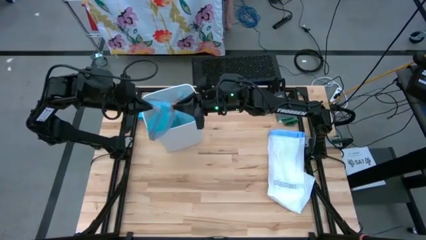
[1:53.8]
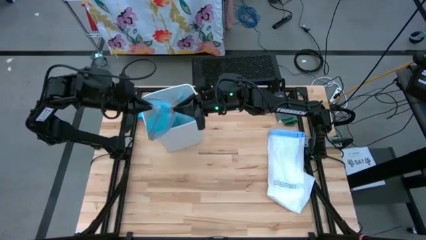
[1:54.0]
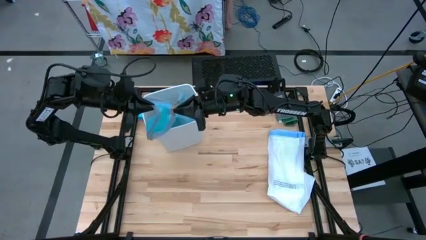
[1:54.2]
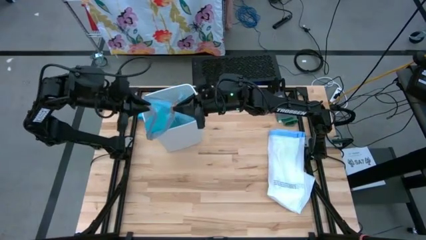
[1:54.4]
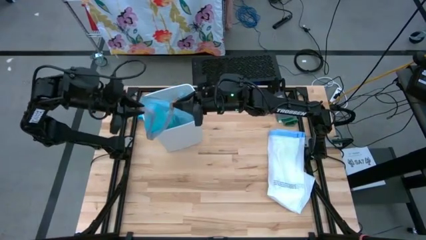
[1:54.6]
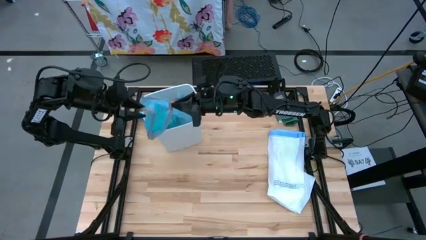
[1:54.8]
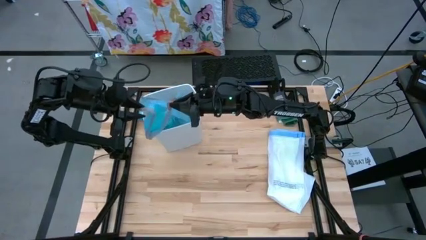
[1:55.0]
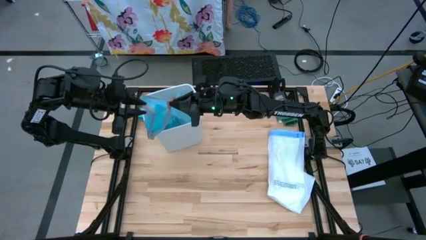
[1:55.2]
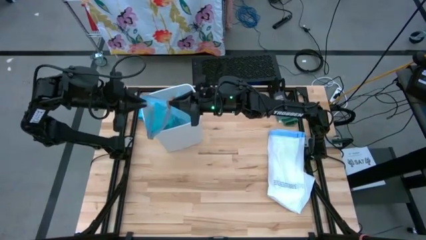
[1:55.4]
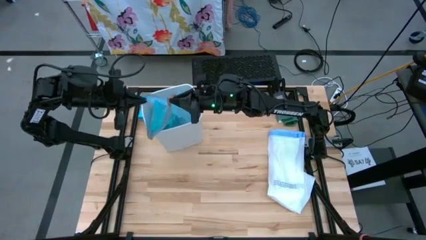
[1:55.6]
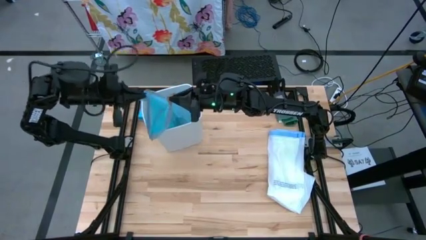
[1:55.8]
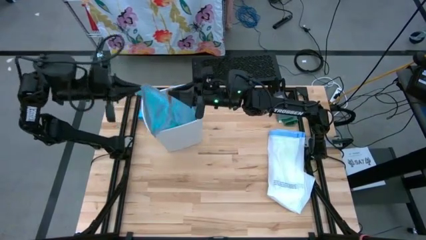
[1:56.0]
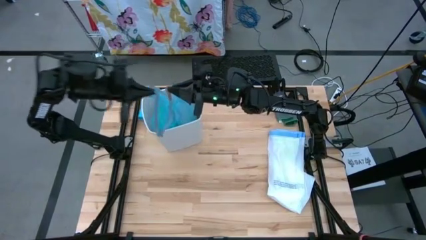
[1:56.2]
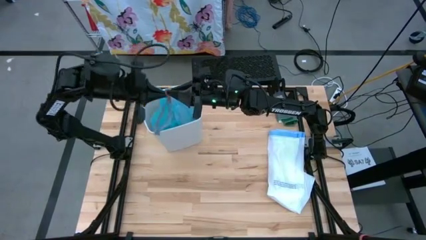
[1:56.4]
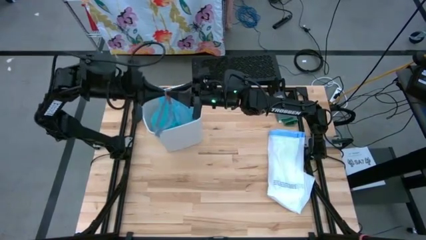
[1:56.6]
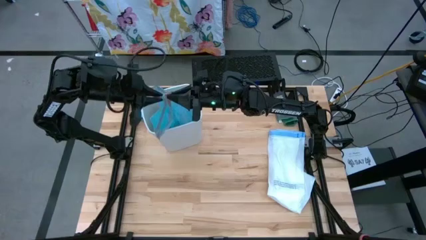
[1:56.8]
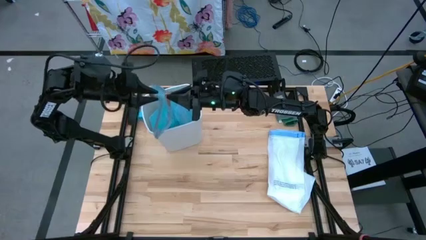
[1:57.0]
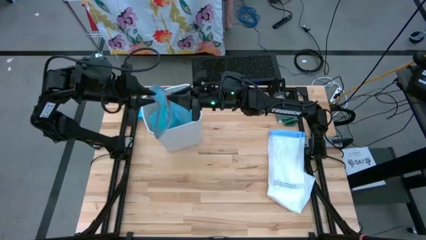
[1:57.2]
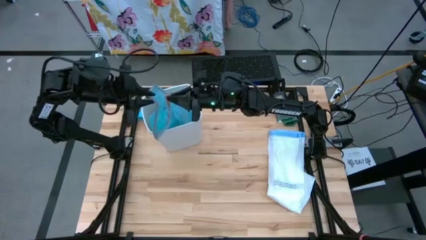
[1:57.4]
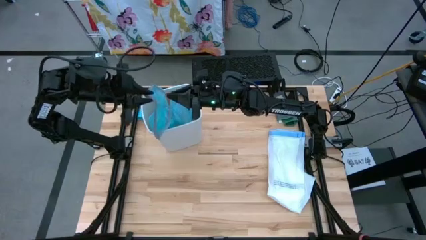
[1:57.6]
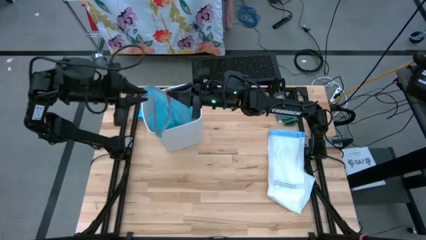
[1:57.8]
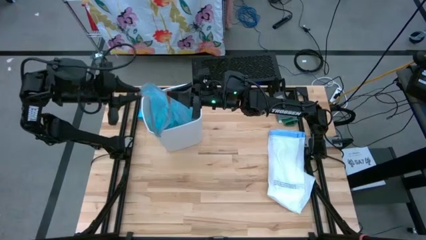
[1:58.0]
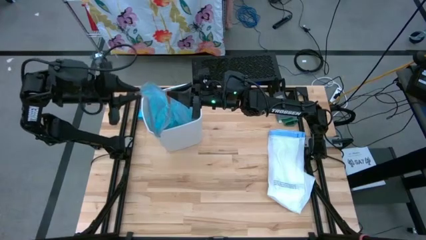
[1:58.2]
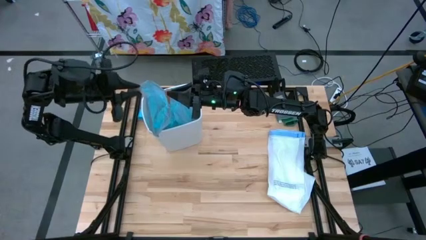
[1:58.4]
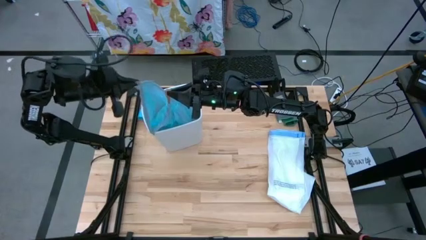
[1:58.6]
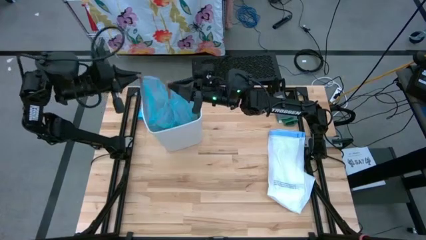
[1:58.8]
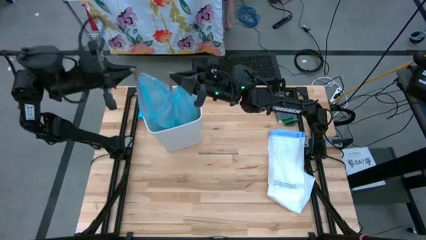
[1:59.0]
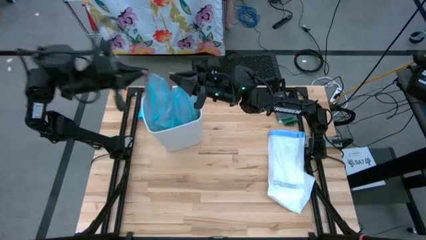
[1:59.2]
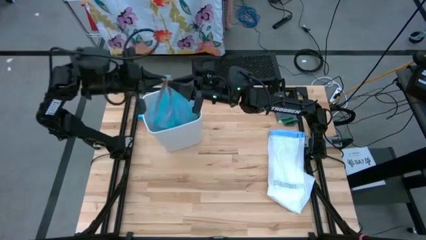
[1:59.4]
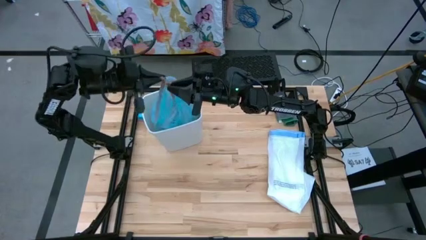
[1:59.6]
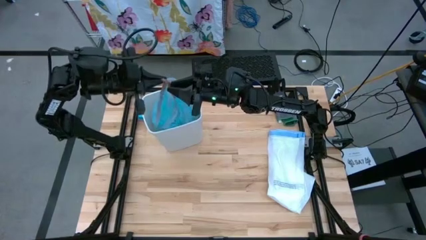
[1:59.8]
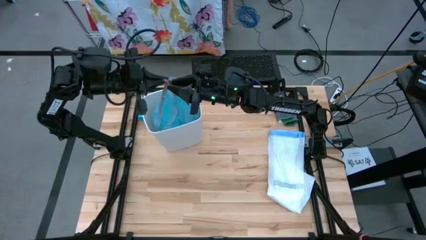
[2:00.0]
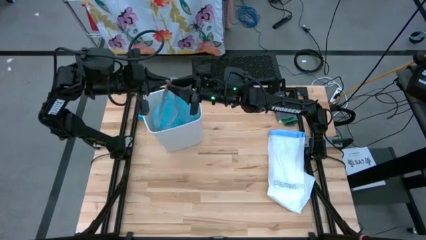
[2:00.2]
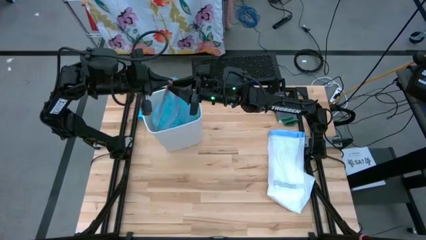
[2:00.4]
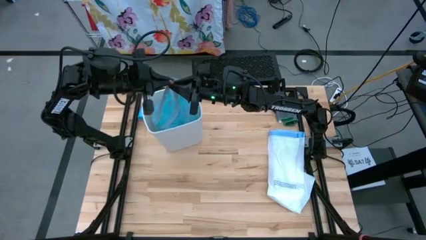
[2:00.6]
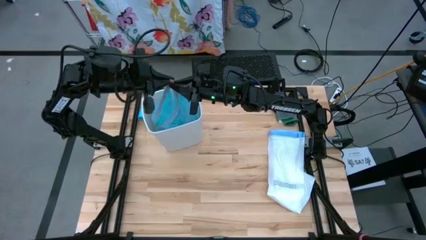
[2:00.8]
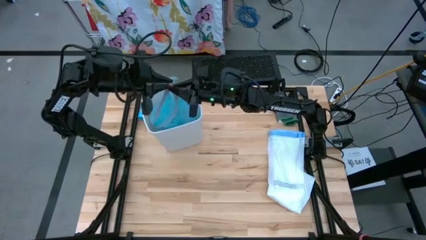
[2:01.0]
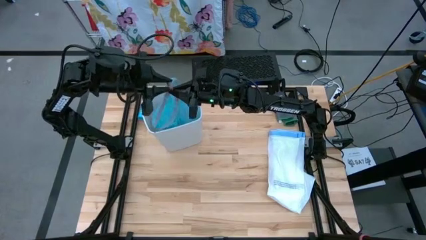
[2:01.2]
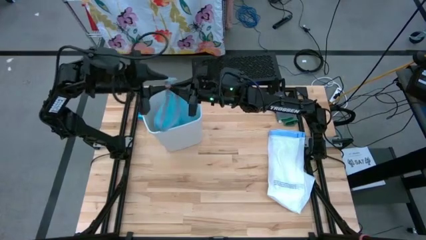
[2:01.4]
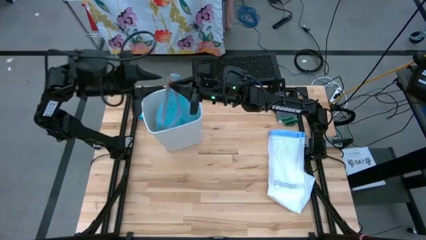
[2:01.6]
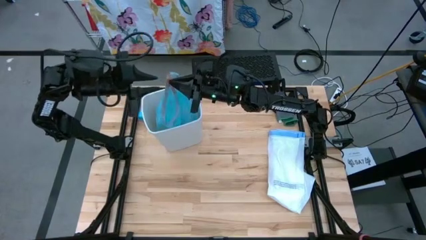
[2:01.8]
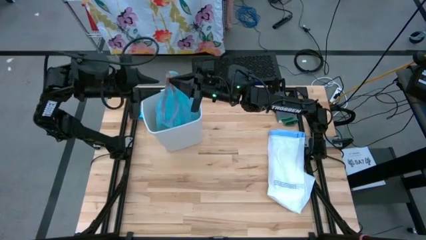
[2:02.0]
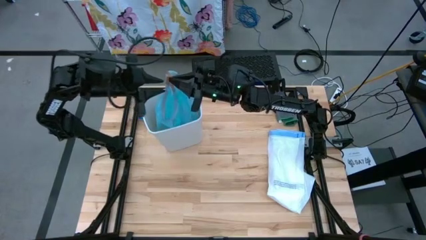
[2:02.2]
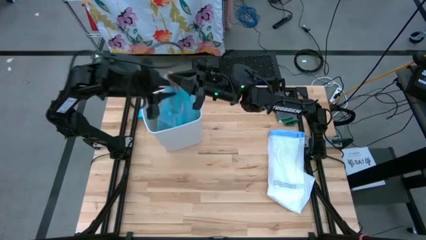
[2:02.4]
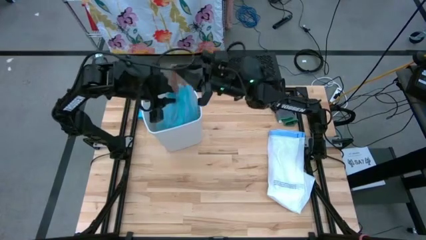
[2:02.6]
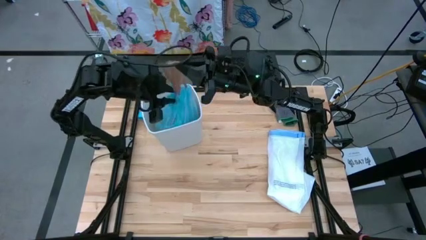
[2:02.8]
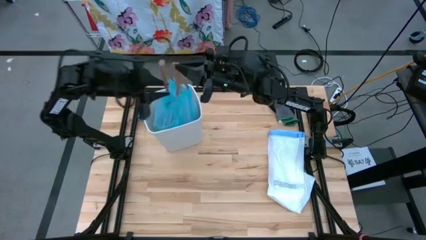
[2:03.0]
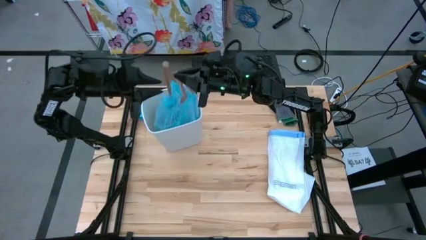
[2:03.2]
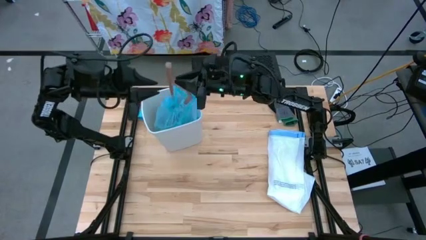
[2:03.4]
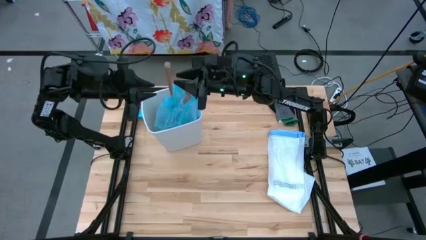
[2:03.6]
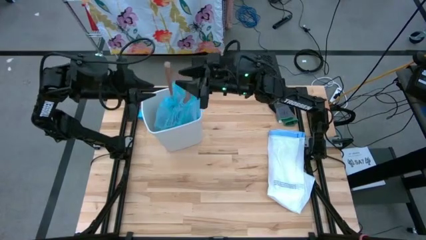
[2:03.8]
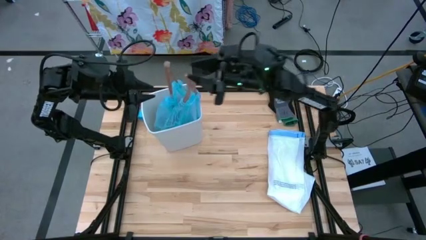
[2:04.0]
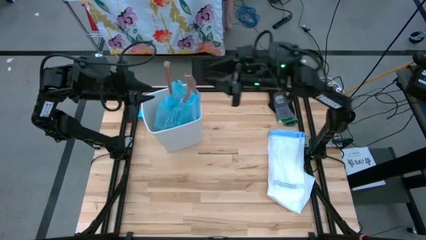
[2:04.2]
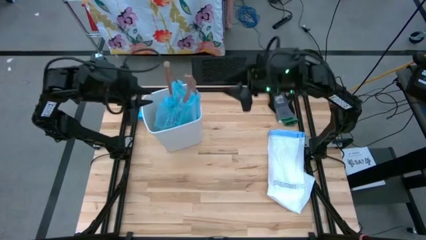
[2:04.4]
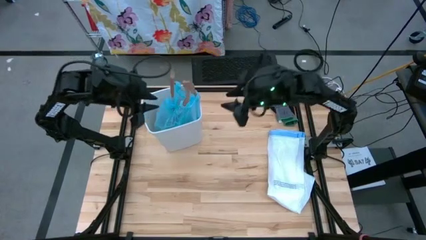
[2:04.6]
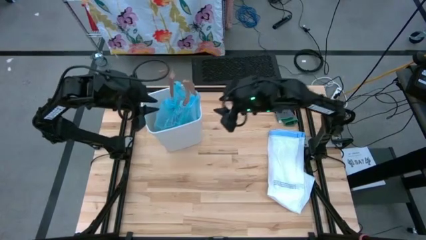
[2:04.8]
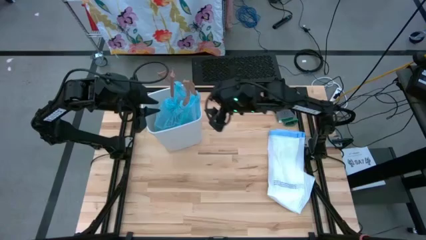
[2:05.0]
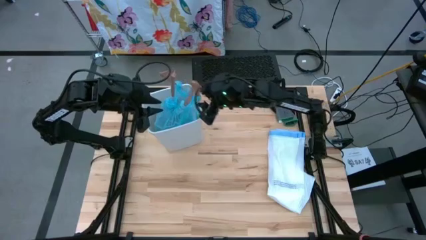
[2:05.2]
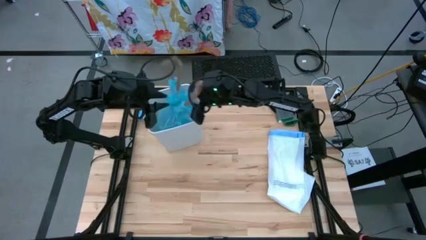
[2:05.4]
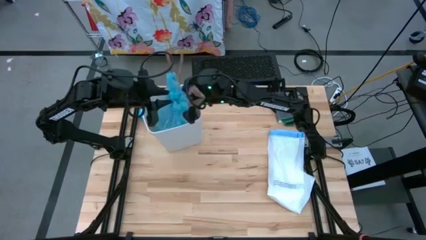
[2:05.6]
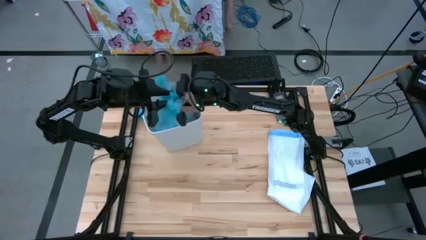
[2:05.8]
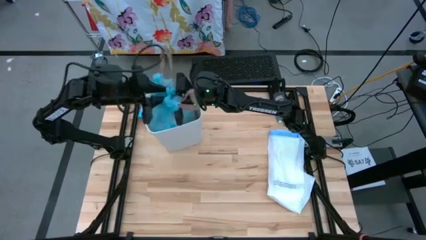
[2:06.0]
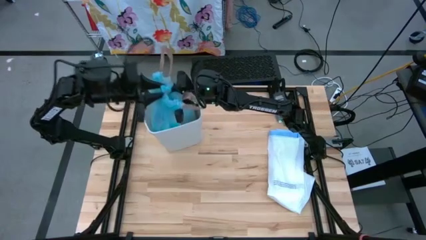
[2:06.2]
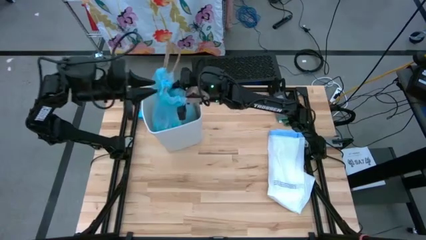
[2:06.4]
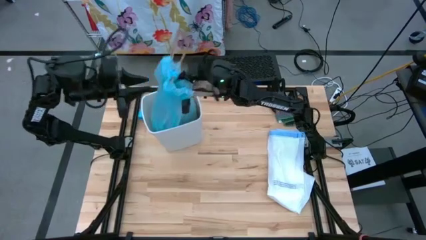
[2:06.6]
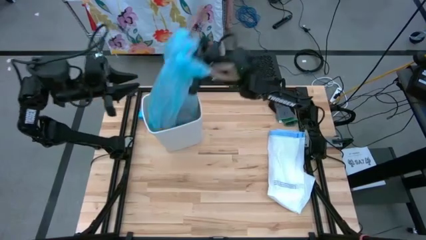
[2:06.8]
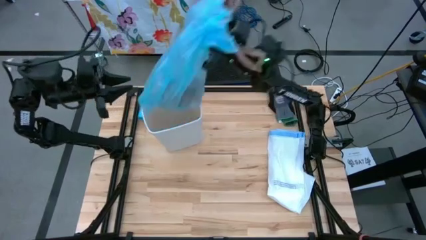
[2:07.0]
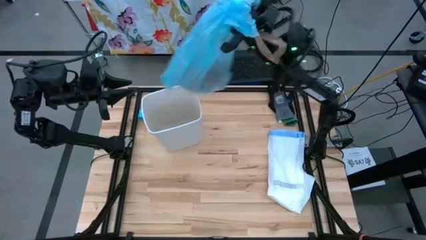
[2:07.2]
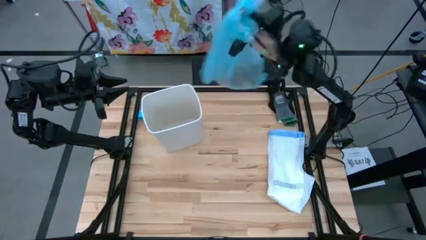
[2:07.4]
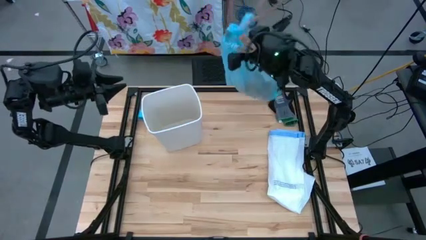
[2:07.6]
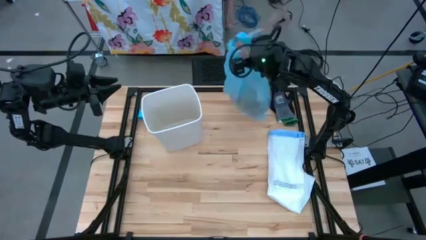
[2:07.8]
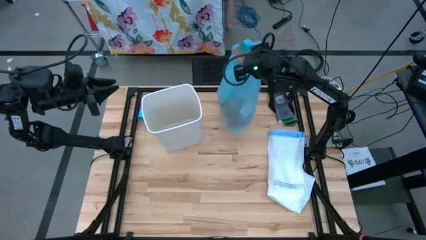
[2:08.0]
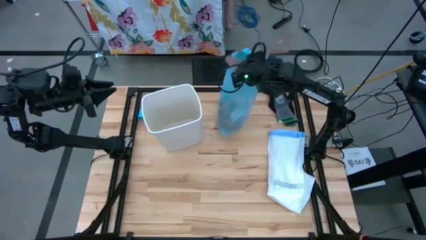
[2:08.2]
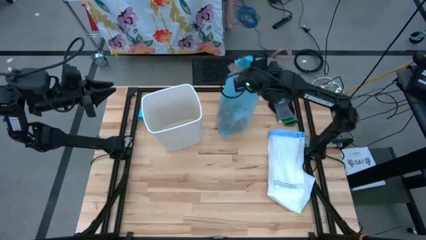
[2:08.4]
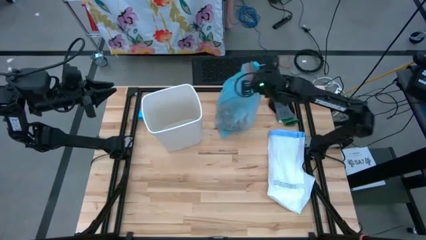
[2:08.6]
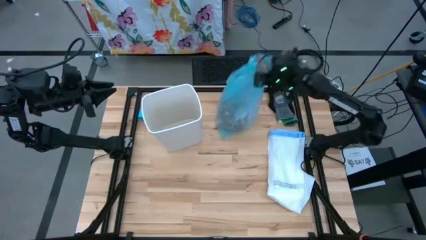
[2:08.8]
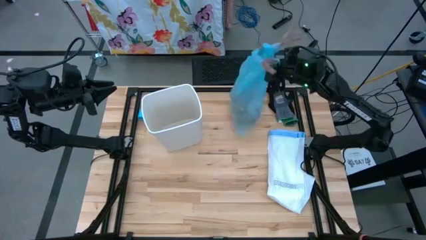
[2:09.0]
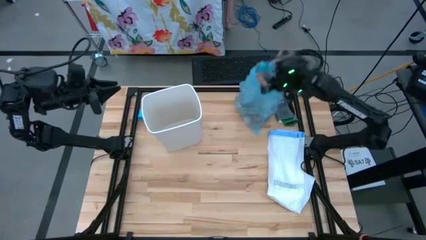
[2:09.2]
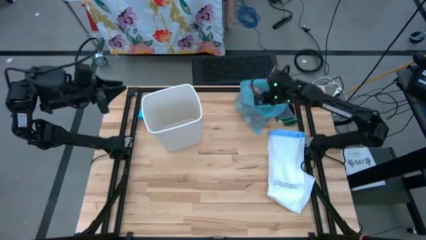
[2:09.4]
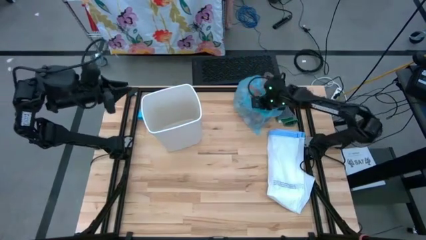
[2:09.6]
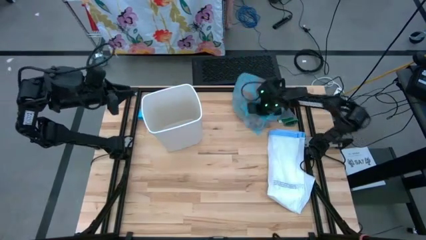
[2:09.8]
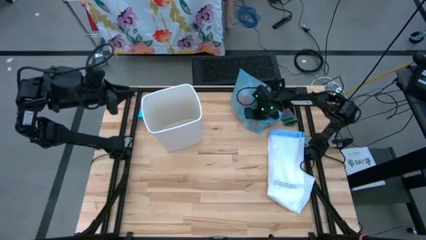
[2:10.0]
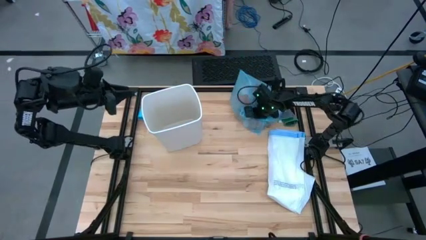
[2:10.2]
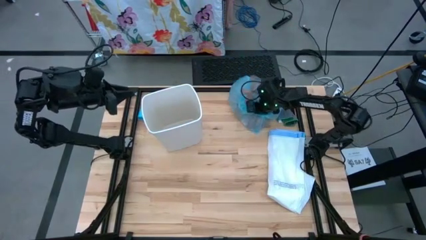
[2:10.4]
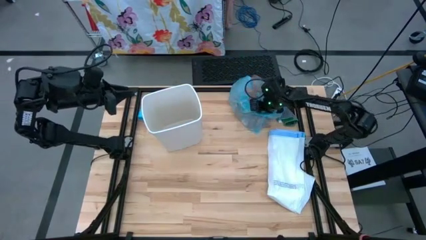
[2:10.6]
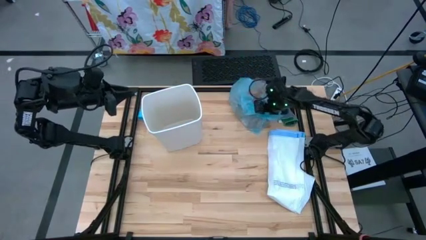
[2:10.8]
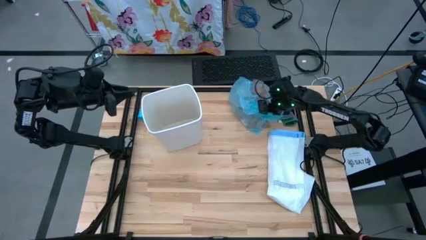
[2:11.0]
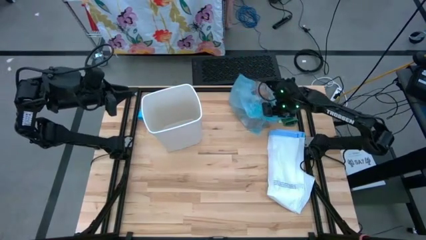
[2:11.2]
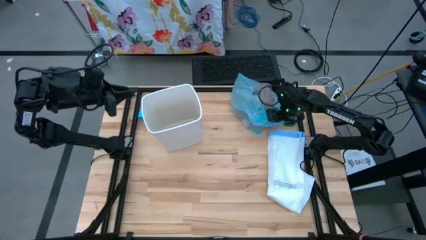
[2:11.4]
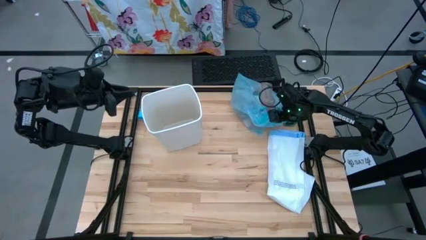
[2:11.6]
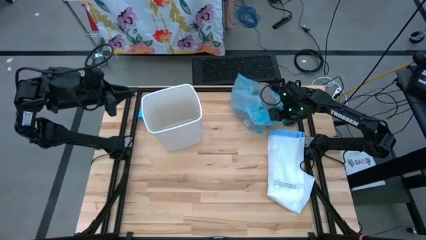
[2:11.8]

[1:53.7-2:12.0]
Task: place trash/remove bag and relplace
Remove the blue trash bag from the white trash bin
